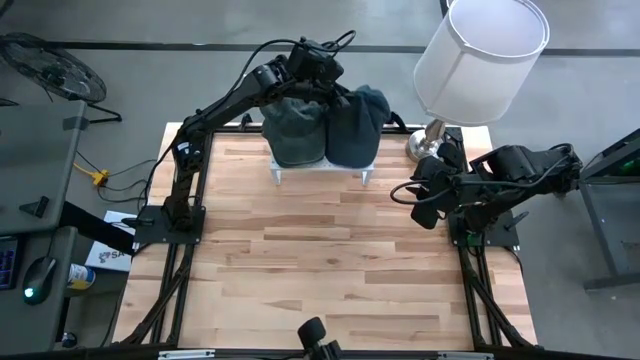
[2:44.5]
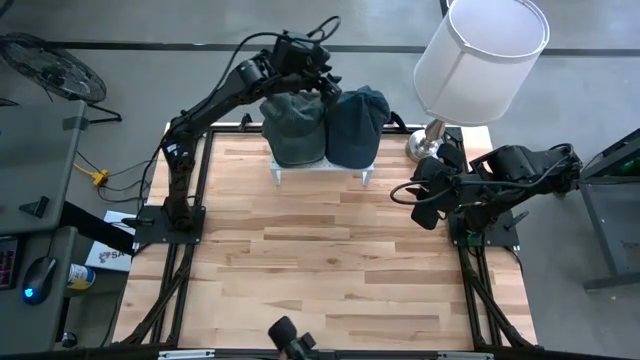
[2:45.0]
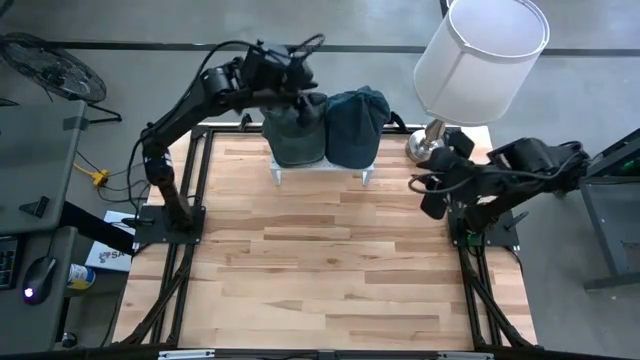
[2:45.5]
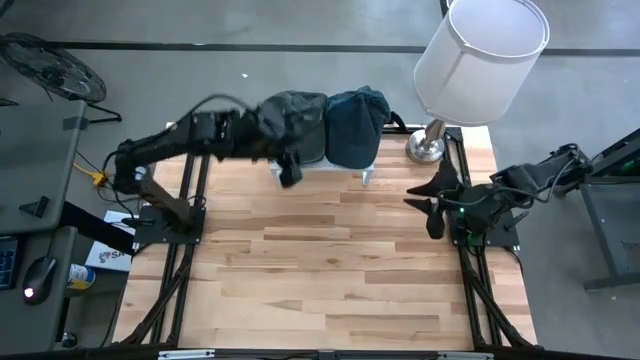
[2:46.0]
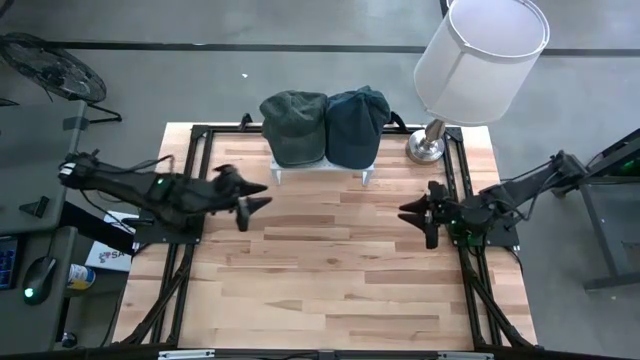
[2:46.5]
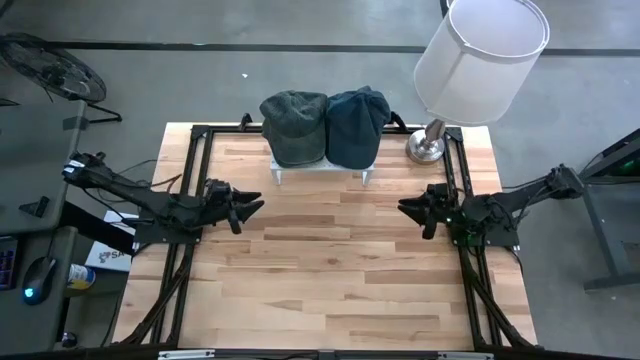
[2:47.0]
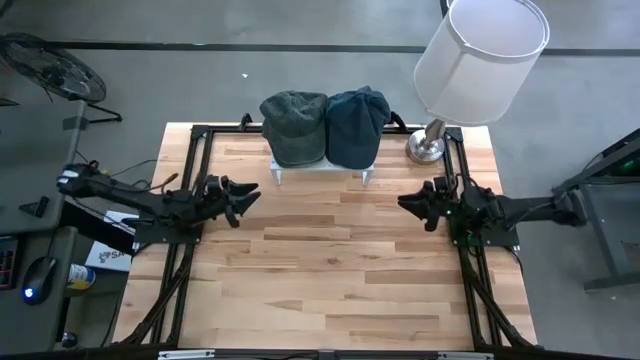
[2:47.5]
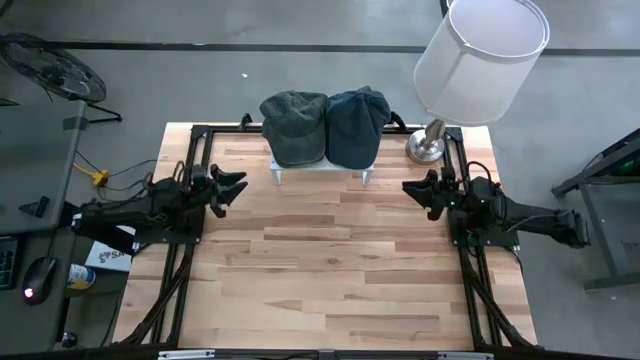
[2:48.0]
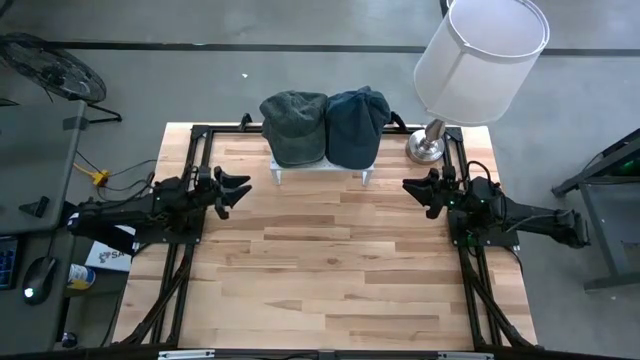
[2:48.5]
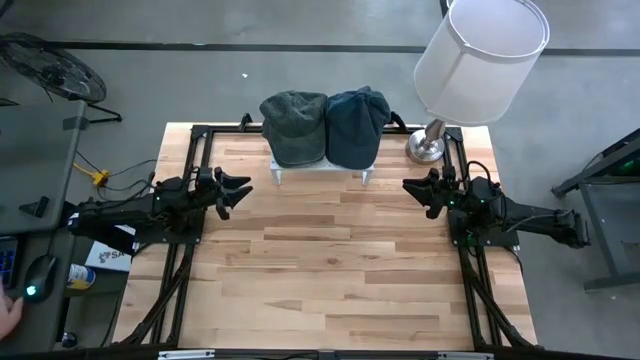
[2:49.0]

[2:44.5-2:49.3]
Task: Pick & Place hat
Return to Home Position

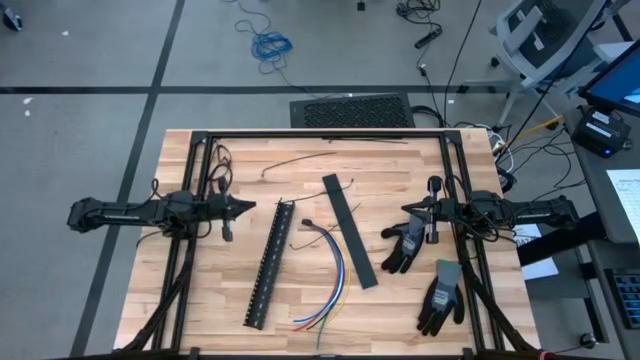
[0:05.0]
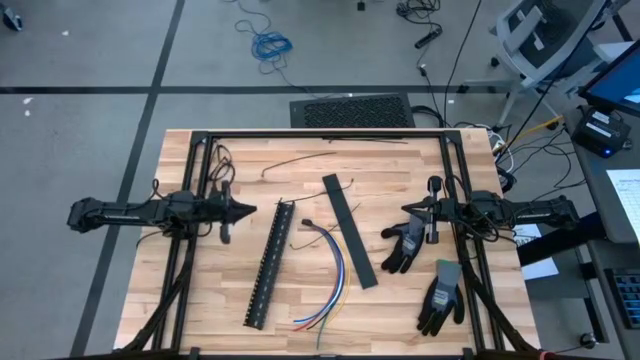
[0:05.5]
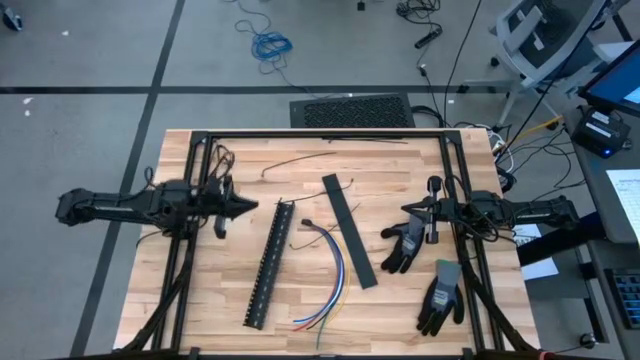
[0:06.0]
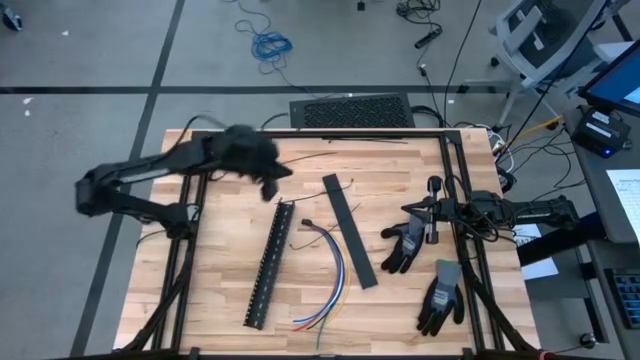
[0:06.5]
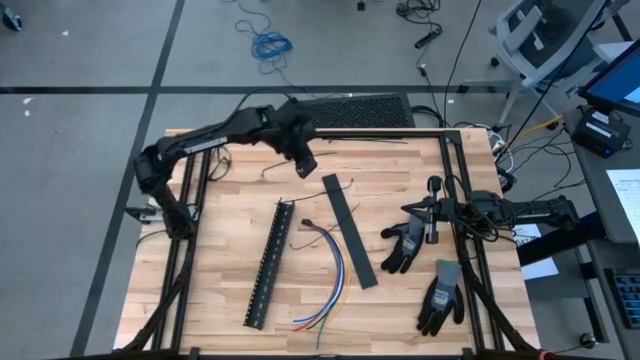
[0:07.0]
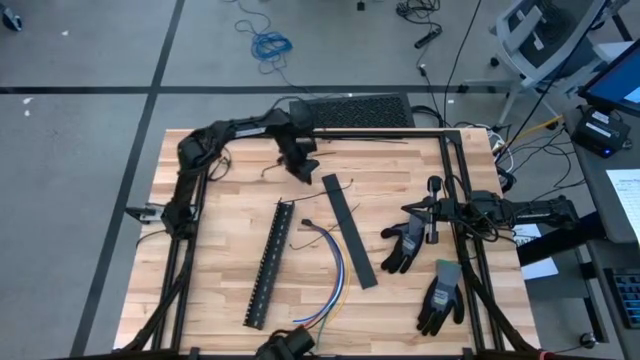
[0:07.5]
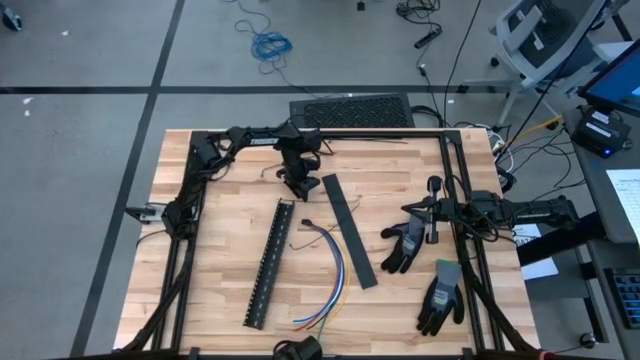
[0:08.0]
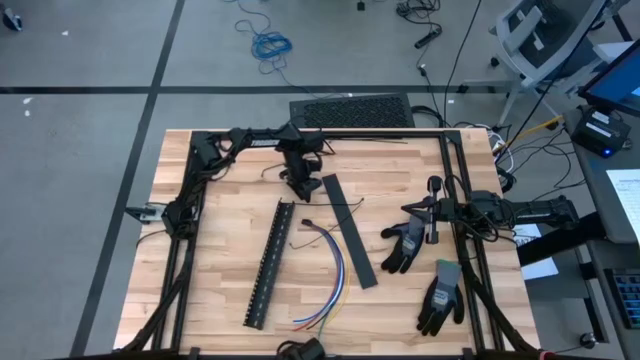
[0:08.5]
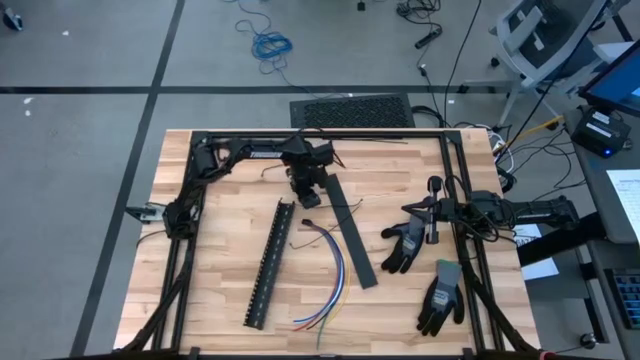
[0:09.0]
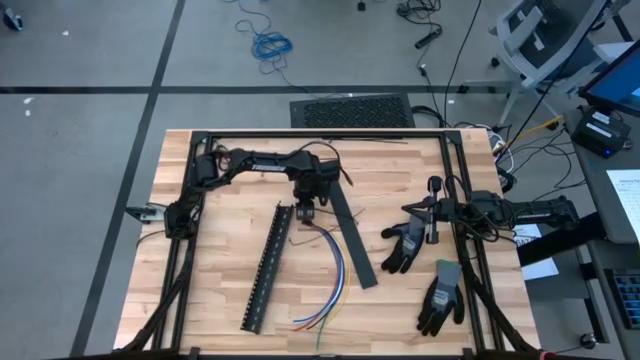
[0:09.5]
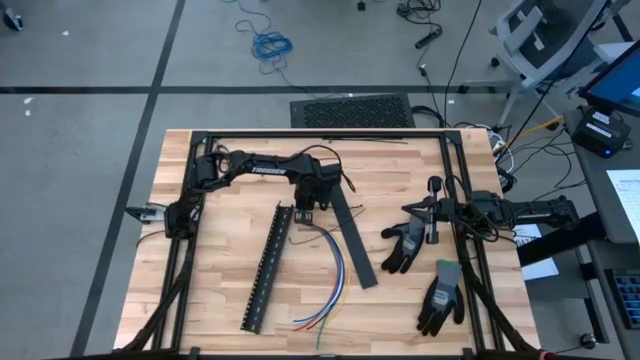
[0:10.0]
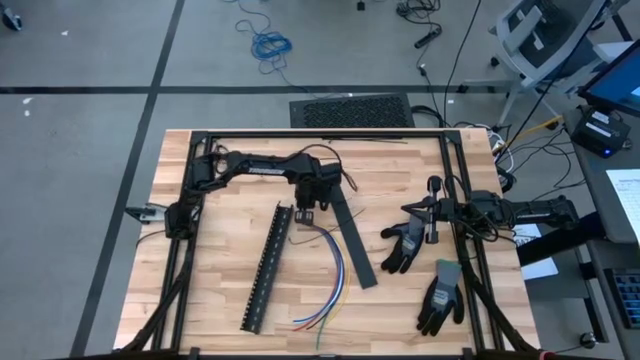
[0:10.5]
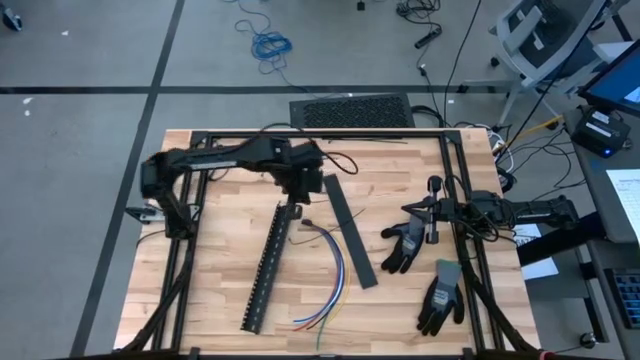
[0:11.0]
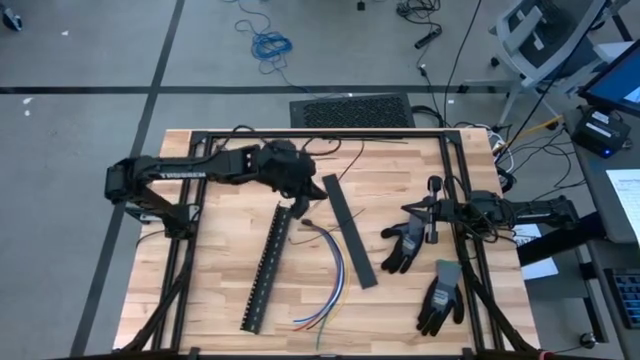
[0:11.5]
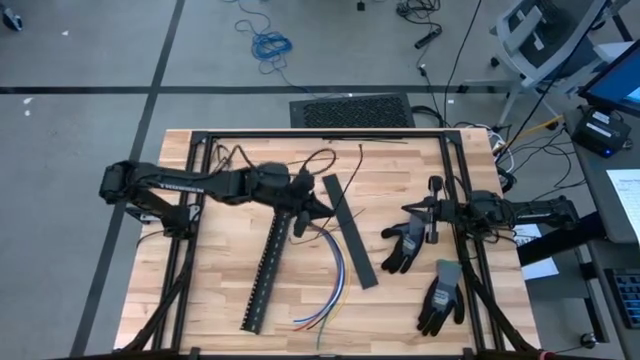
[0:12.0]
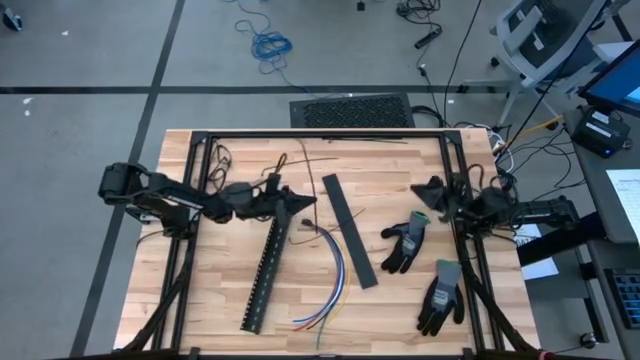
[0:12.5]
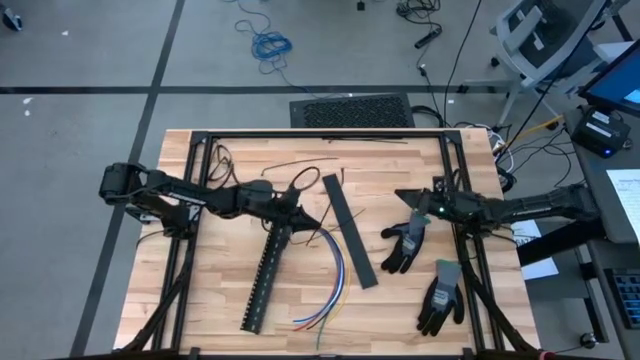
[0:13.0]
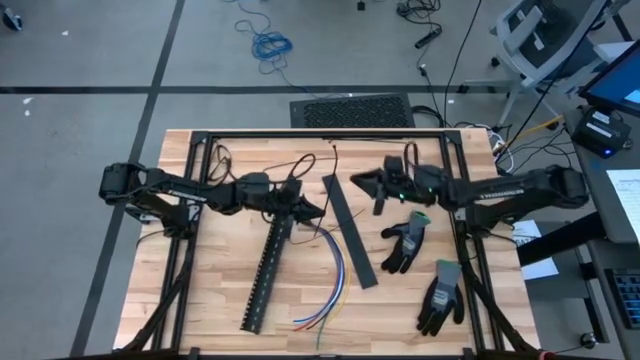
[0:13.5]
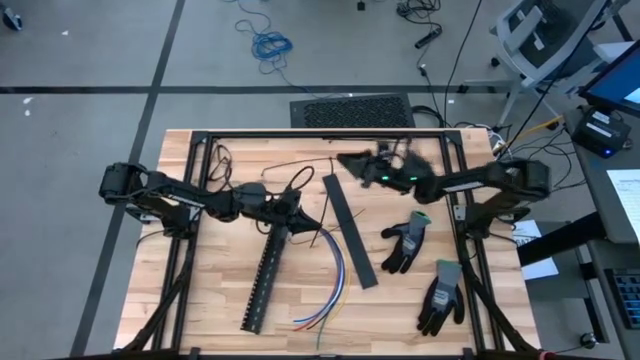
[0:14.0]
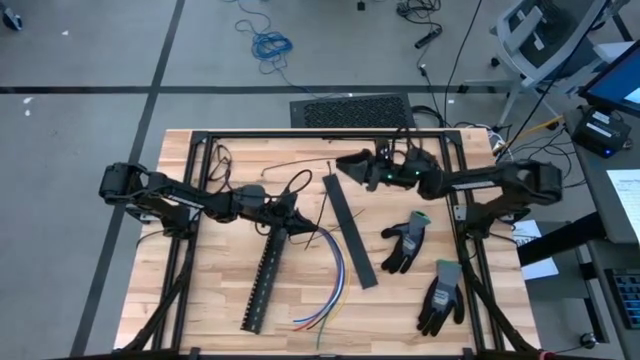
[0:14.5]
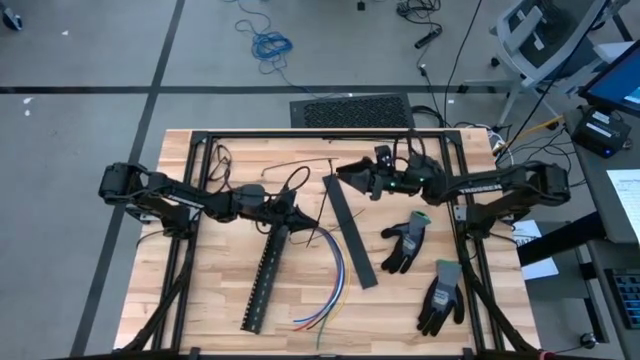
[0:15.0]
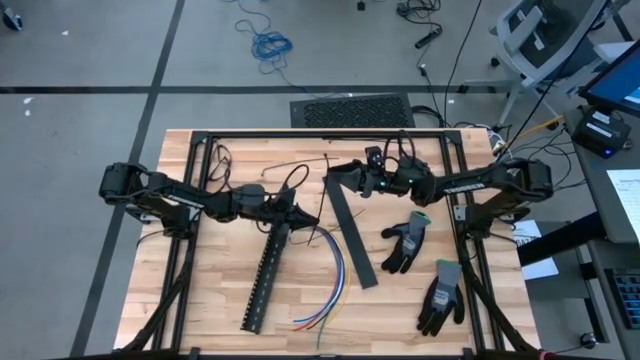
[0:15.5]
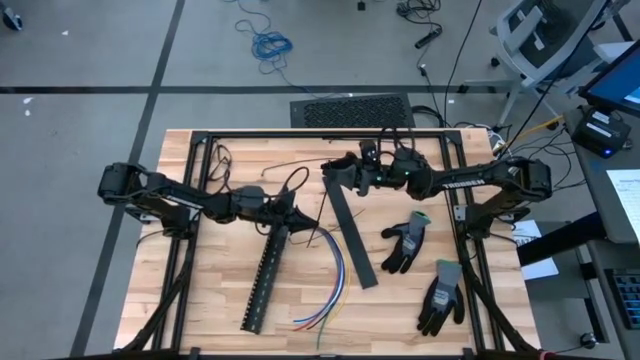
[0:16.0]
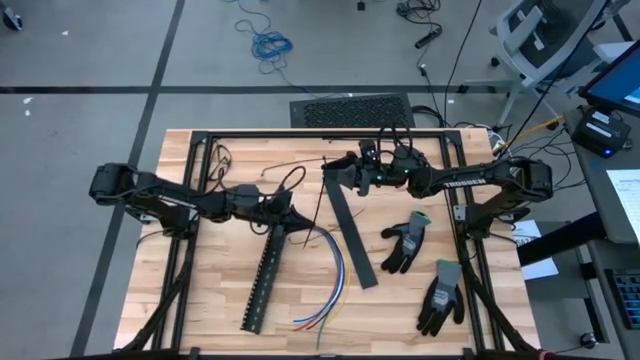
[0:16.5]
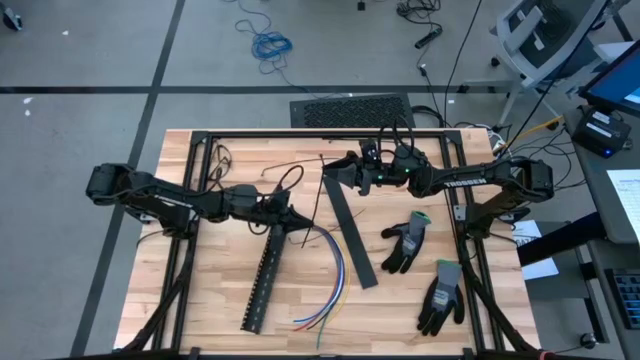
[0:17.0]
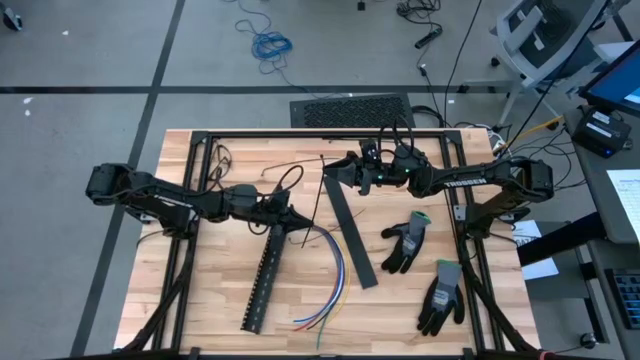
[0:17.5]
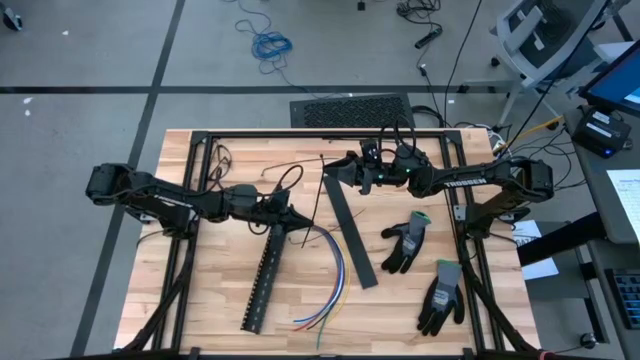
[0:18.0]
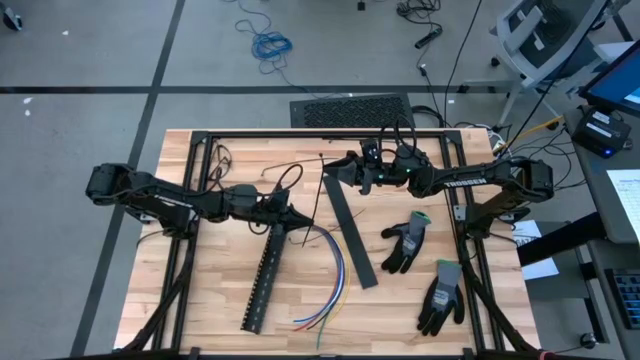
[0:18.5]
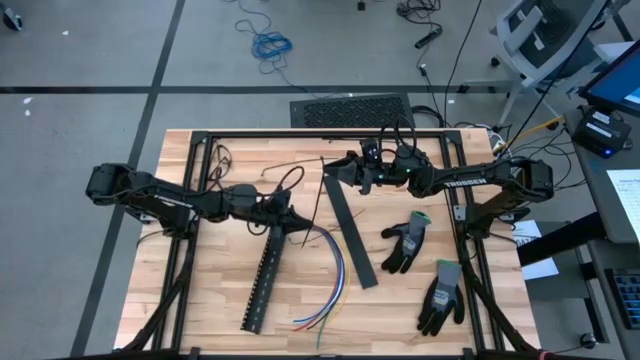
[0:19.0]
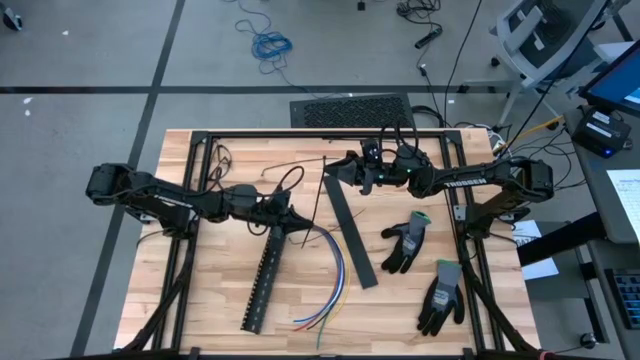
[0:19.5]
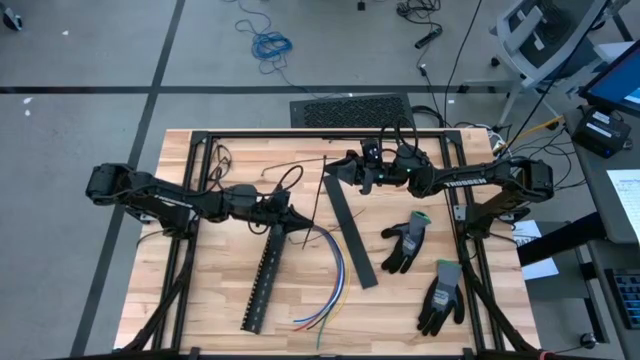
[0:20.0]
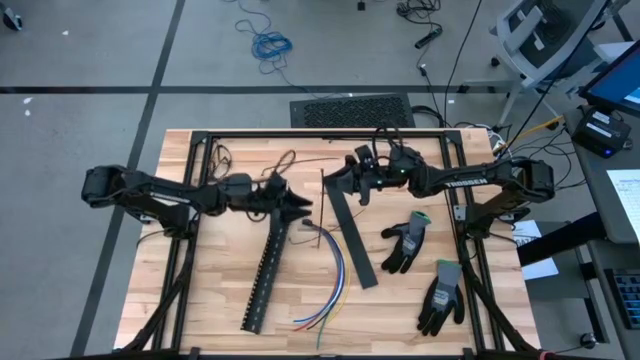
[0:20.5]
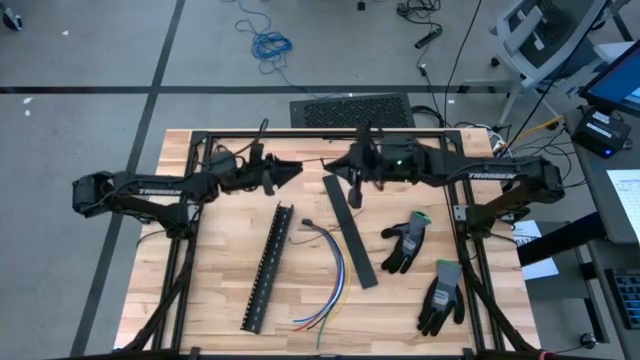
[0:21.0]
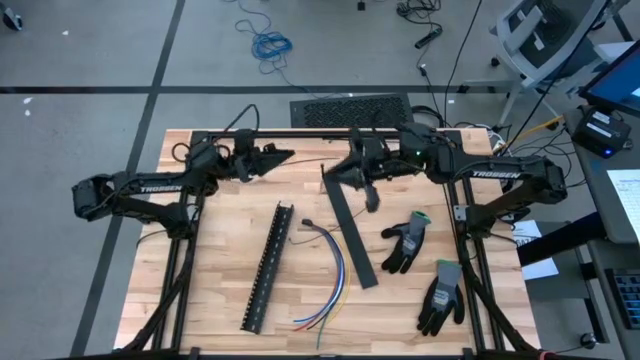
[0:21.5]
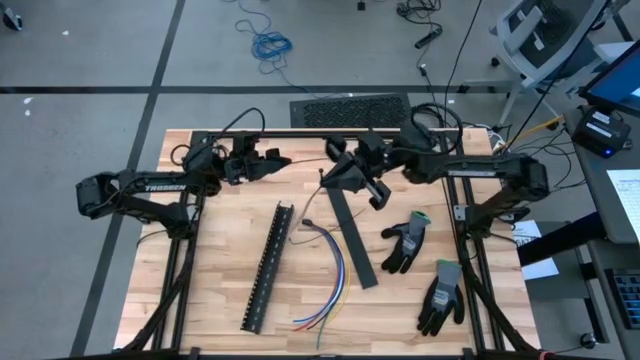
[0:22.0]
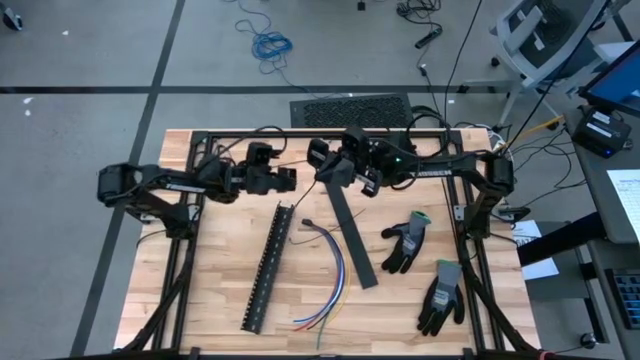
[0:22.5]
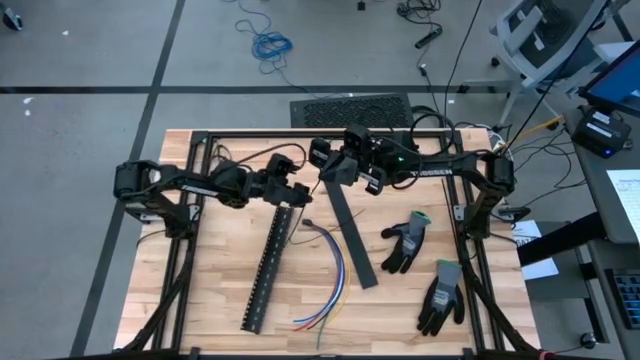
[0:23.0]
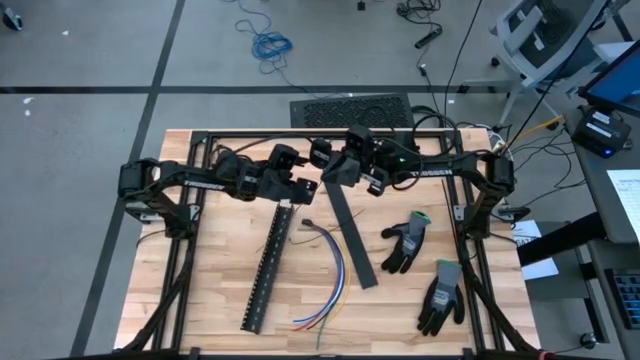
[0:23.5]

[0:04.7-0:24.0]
Task: Ziptie cables
Wrap the black zip tie on the cables
